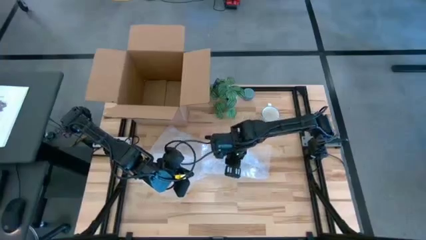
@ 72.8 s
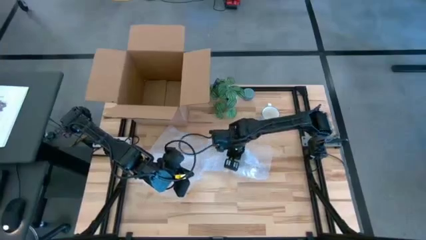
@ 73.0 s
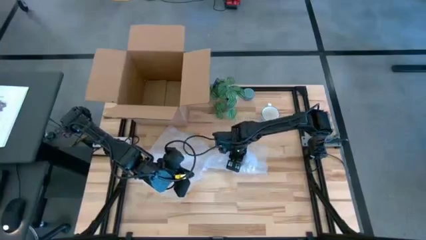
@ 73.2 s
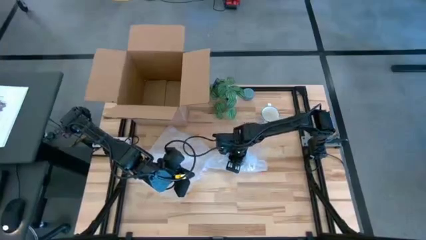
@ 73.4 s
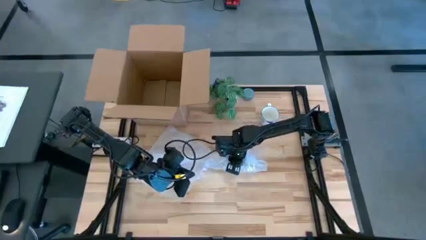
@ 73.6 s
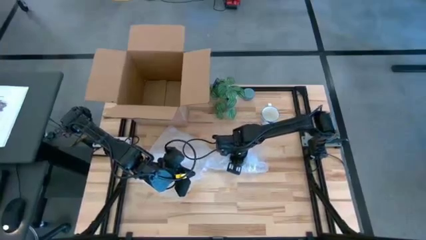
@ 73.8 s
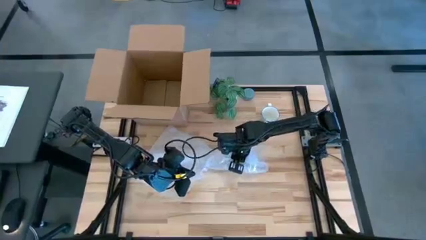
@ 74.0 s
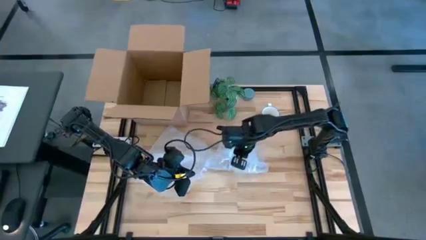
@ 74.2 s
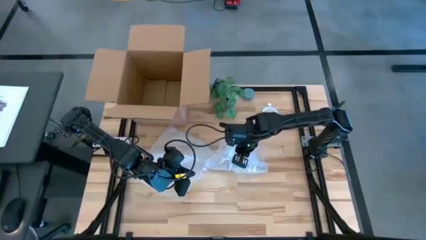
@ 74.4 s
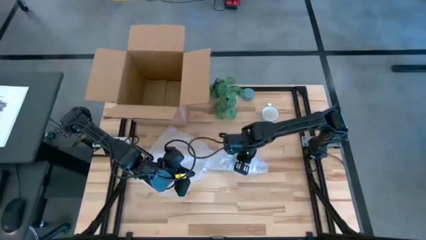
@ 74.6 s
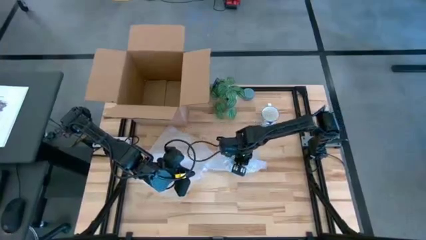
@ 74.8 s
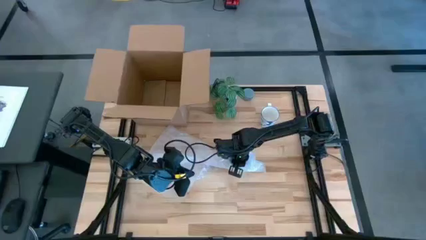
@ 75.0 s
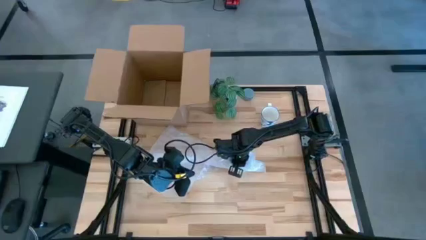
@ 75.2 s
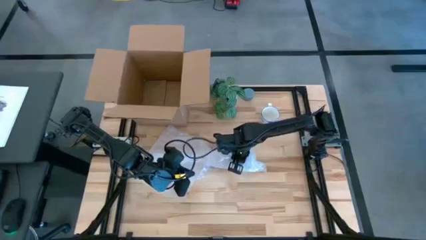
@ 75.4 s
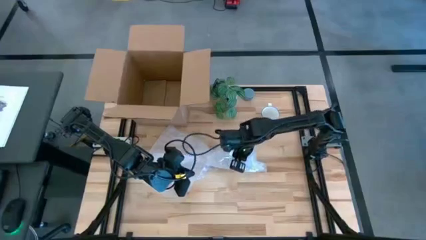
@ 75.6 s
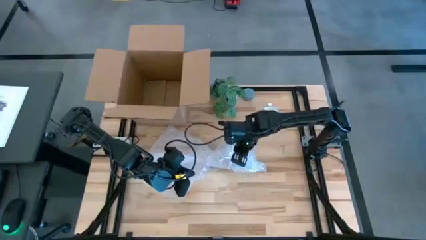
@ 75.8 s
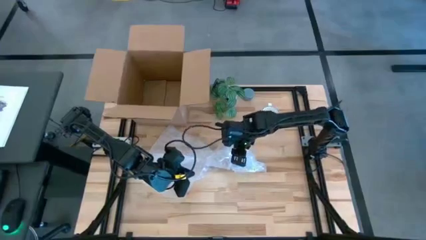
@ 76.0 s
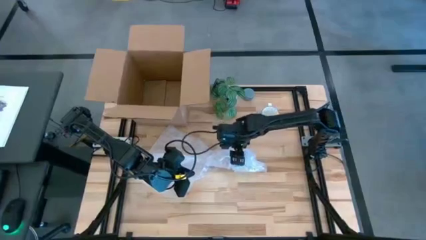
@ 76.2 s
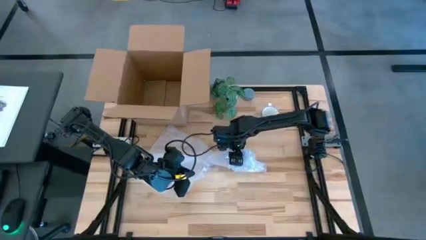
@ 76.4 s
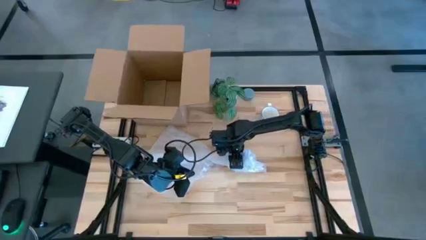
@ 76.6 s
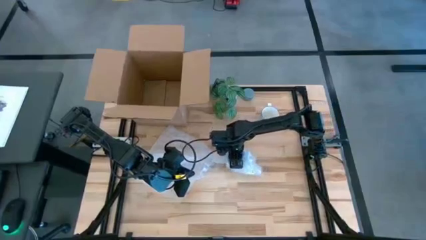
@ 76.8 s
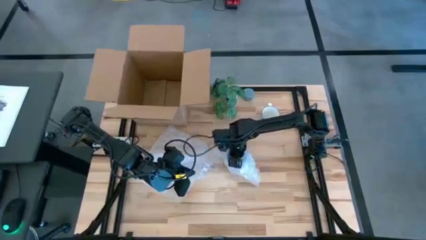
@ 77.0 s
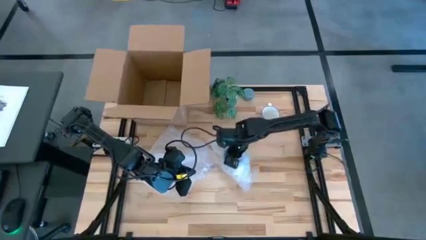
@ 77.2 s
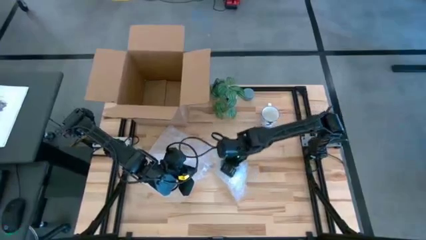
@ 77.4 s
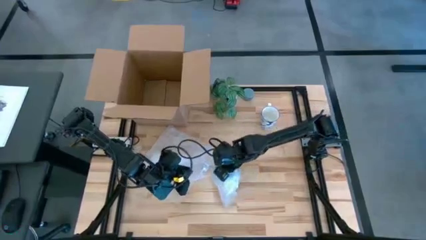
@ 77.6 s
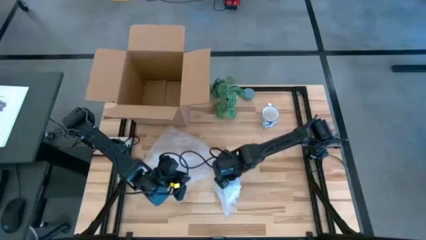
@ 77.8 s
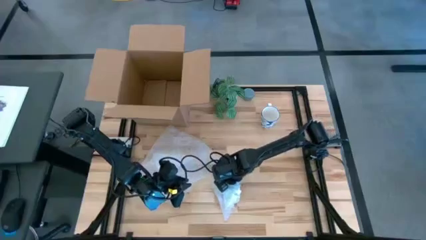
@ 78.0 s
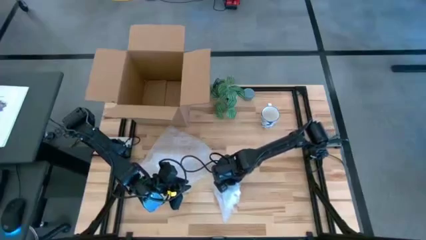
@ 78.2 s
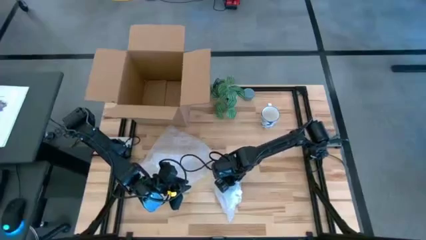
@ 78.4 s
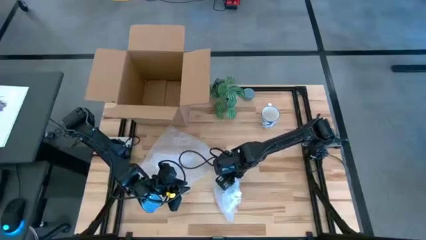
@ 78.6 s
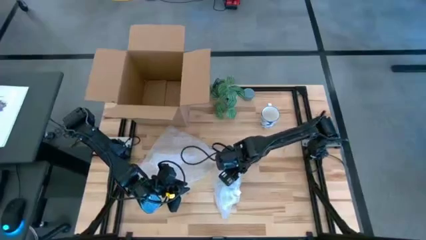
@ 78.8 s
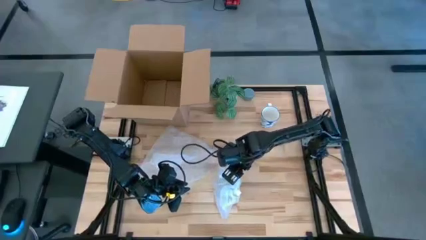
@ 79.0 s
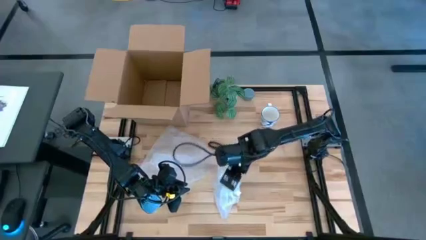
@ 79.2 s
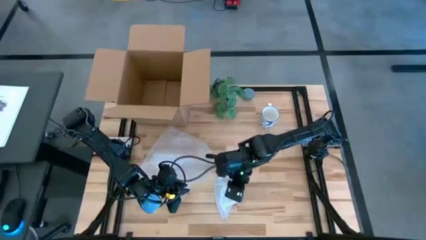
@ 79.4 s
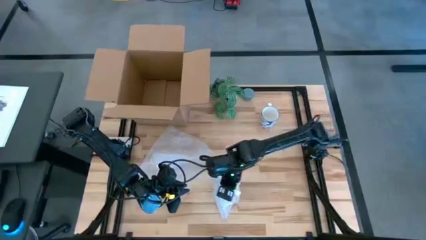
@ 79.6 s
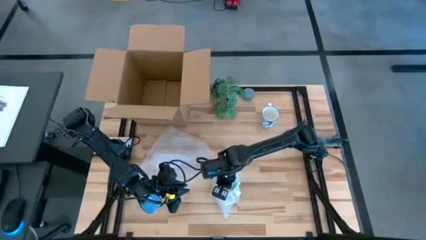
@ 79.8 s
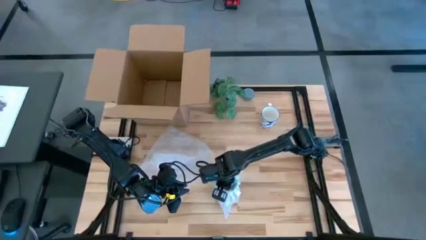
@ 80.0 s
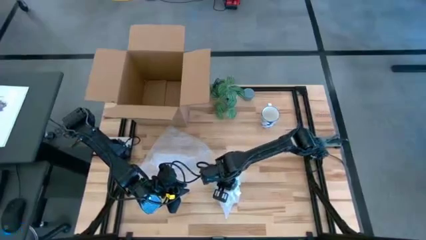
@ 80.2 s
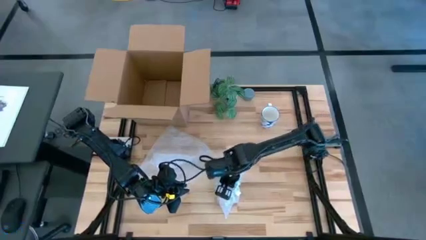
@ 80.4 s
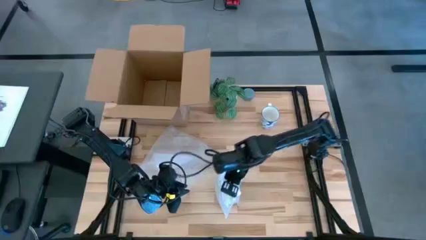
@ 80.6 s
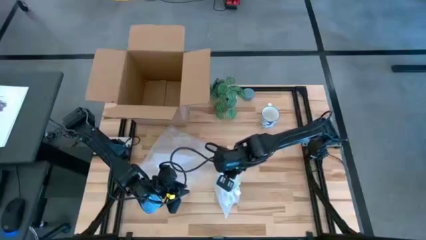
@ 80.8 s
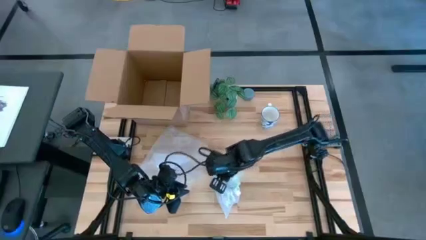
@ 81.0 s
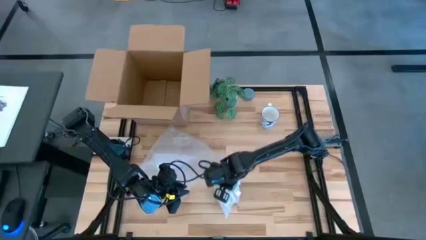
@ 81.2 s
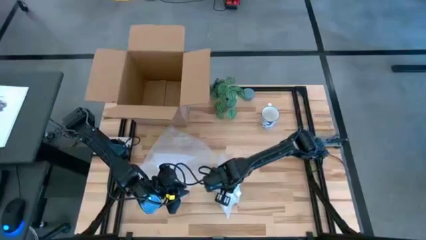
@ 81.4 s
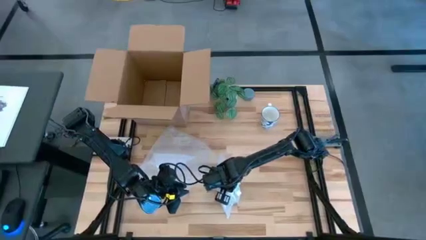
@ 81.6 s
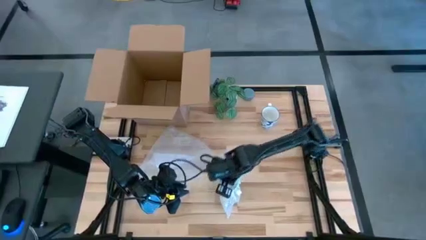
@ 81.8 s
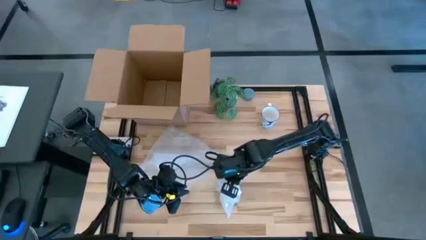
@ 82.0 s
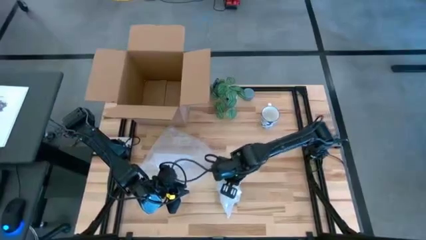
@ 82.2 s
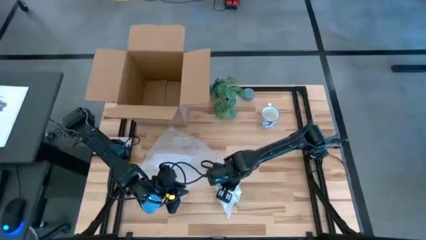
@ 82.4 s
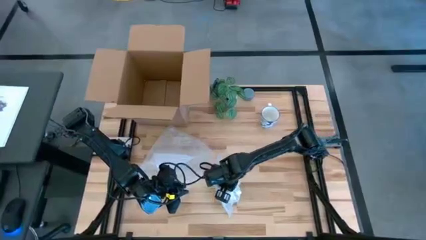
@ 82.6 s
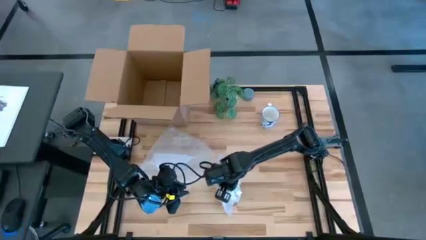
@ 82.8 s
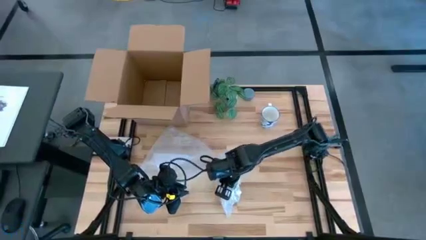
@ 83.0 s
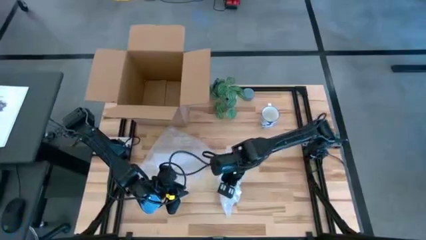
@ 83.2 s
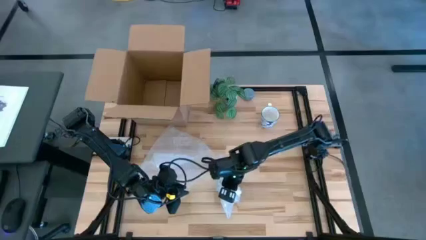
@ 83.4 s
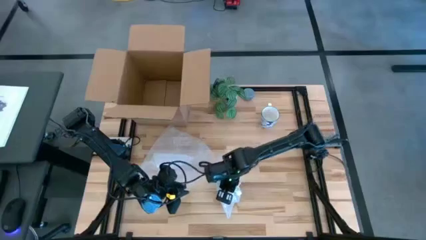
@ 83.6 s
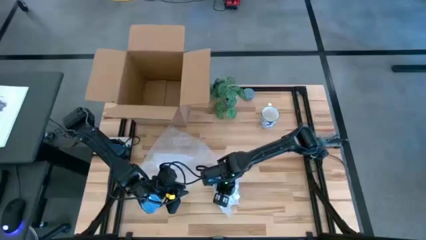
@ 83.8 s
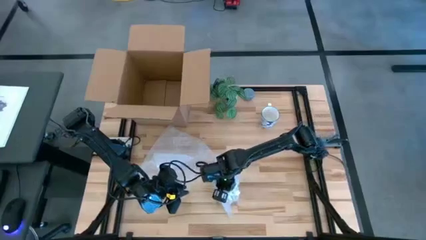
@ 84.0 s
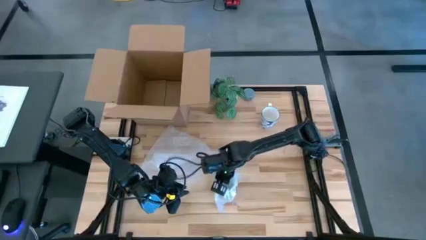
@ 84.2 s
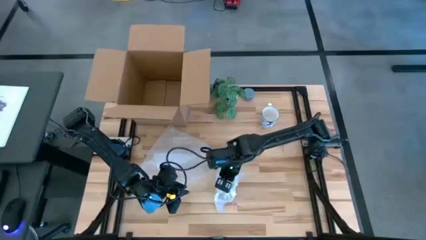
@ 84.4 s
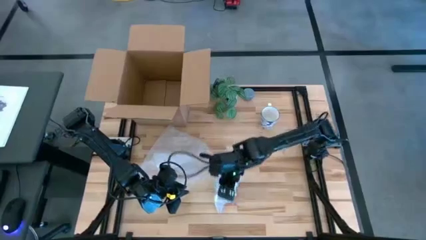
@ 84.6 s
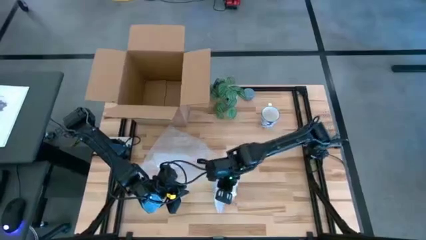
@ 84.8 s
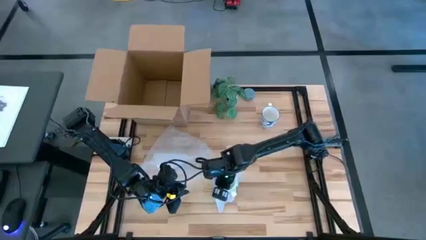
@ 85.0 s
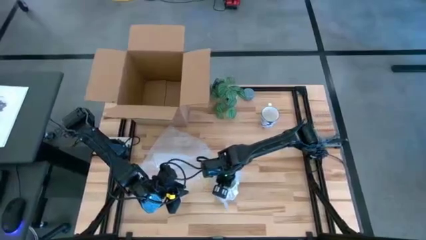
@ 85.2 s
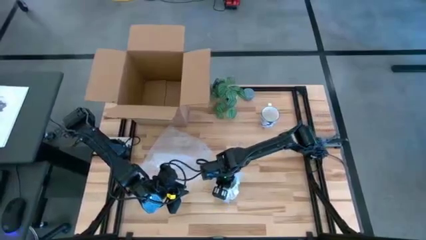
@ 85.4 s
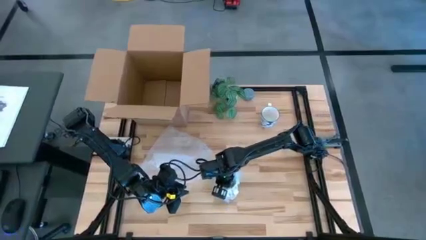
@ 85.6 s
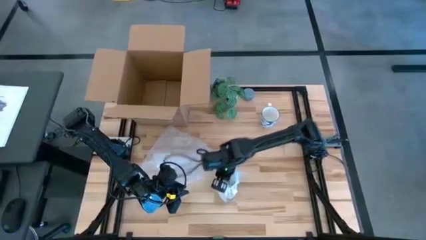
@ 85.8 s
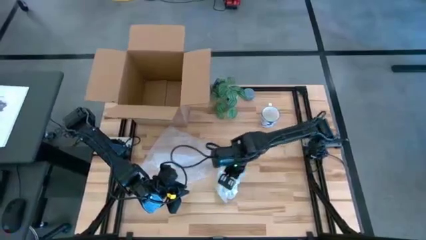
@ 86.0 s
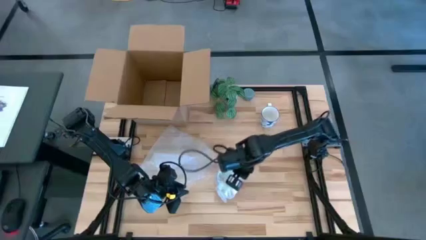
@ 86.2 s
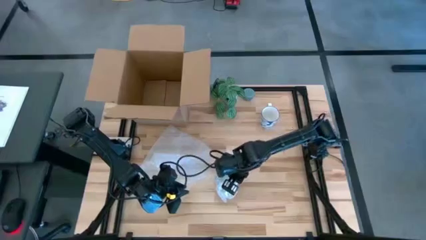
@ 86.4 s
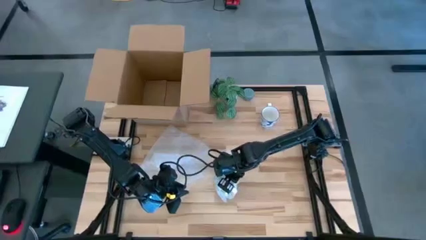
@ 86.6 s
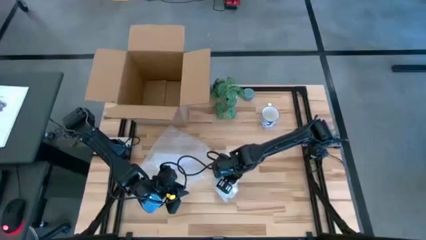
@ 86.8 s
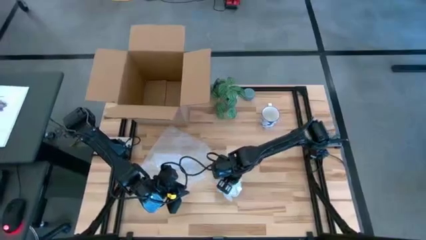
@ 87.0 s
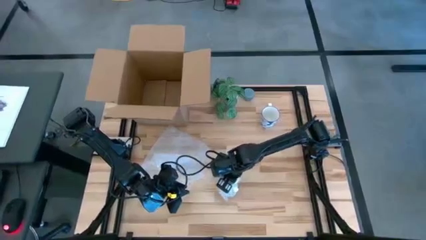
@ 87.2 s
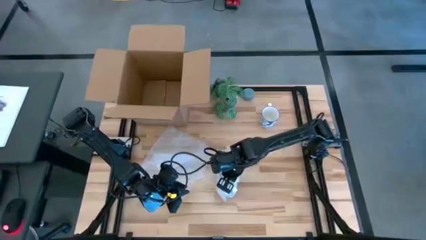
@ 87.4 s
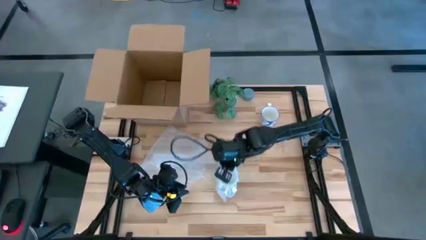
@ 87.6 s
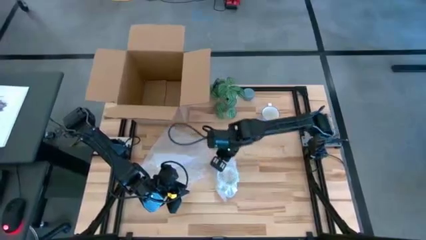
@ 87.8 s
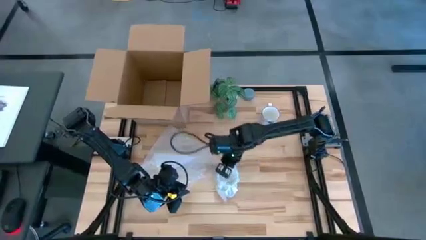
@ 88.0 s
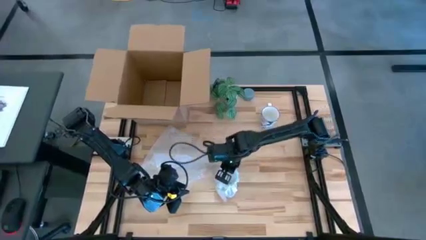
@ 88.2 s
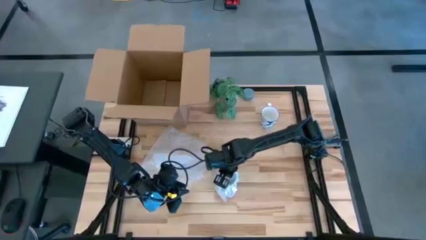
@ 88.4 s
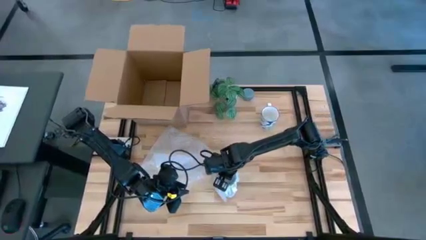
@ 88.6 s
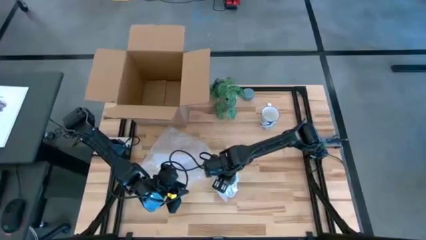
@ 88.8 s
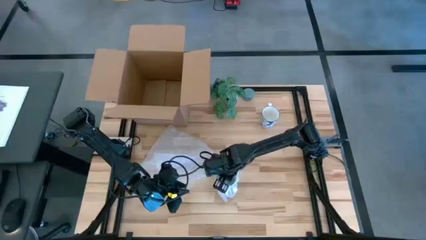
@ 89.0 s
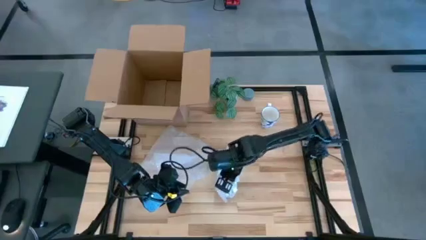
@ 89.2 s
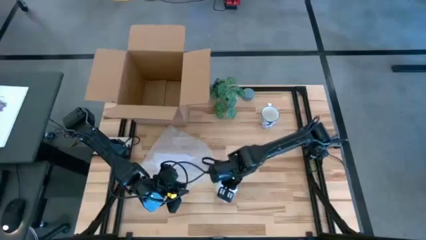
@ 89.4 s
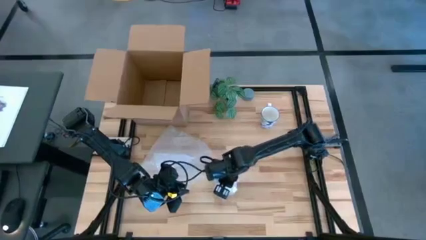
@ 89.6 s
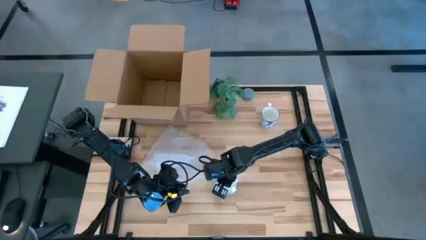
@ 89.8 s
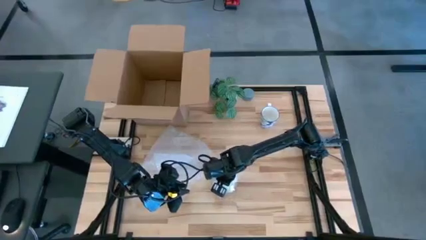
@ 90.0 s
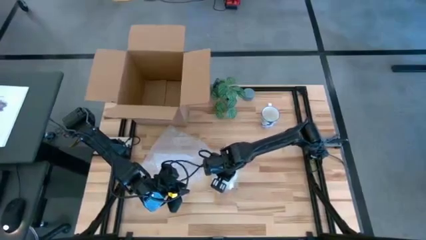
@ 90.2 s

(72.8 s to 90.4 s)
Task: wrap mug
Wrap the green mug with the bubble wrap
